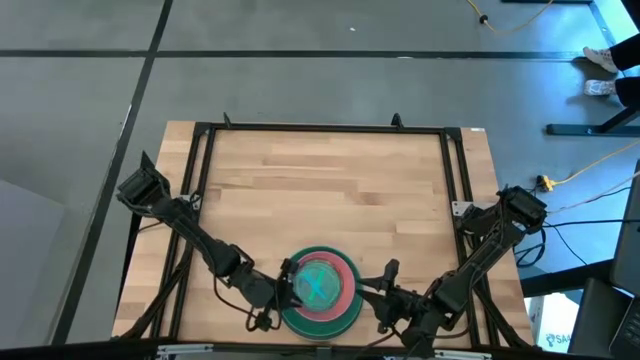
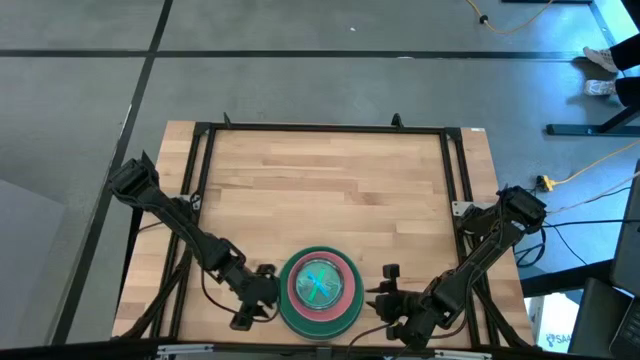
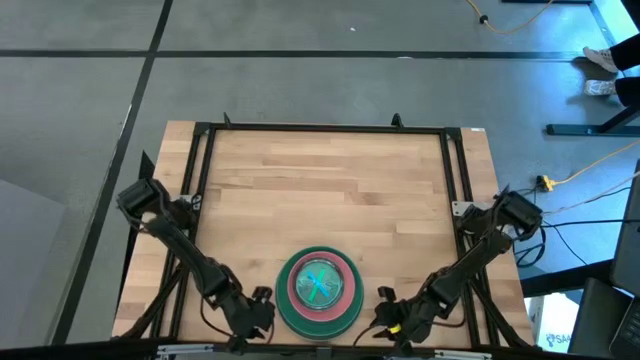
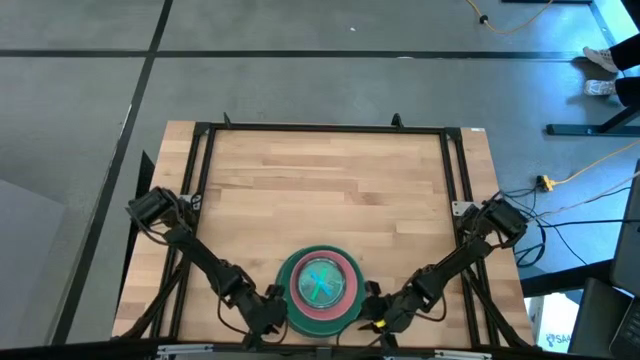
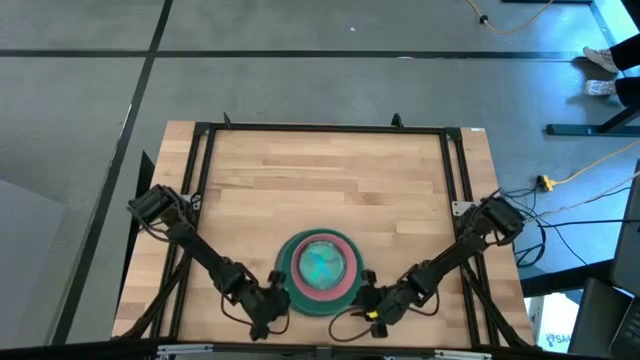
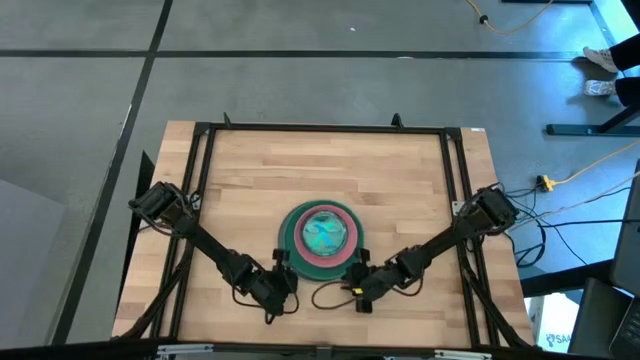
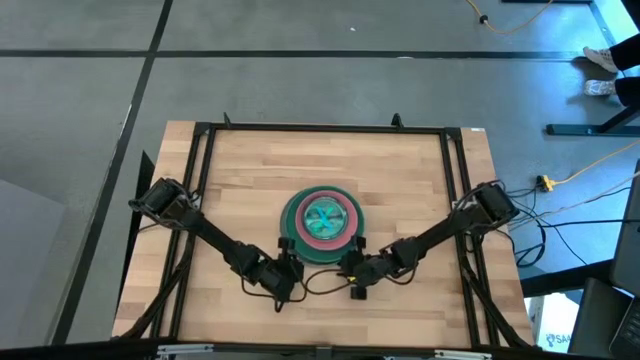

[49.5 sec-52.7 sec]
Task: Stack plastic plates
Move the stack of plates to the center of the table

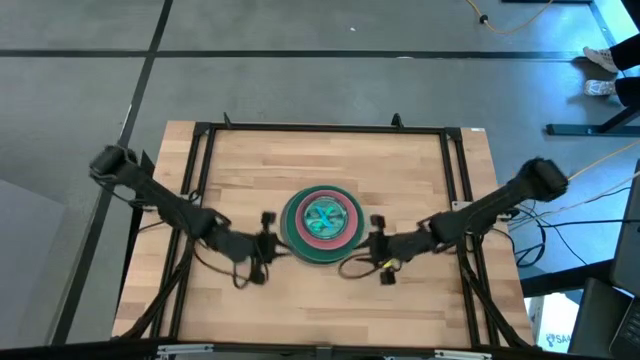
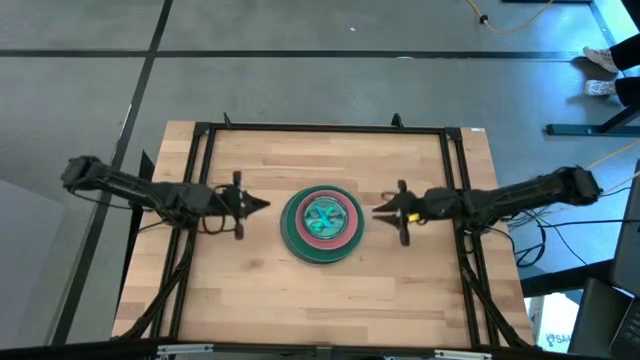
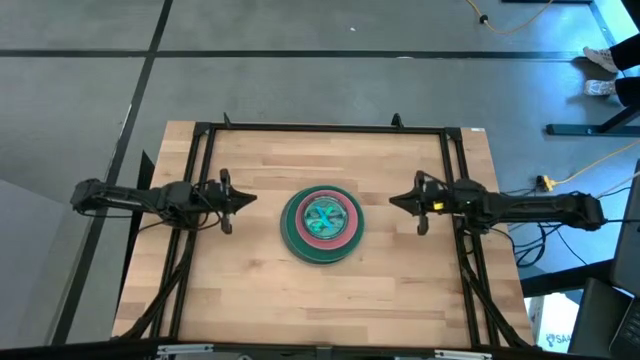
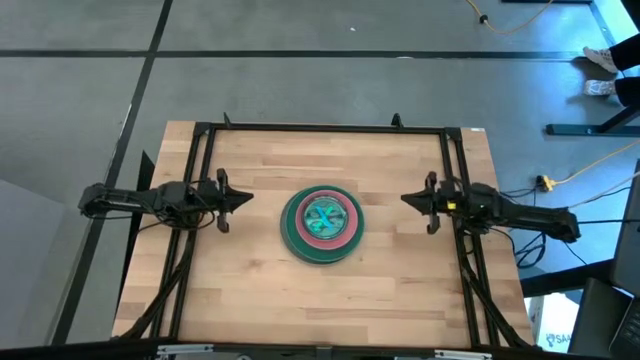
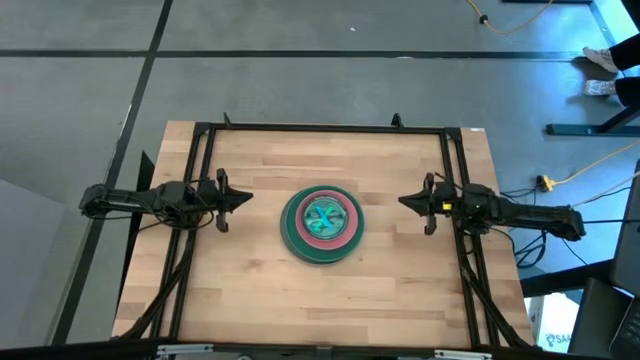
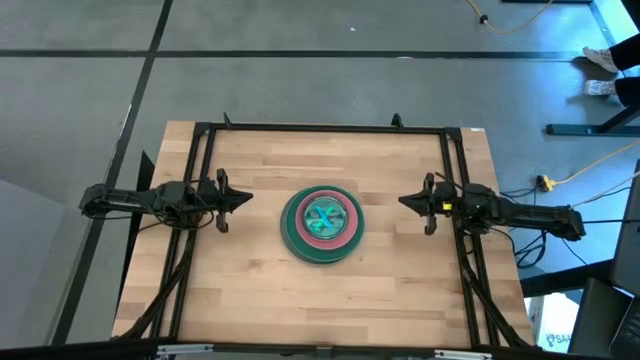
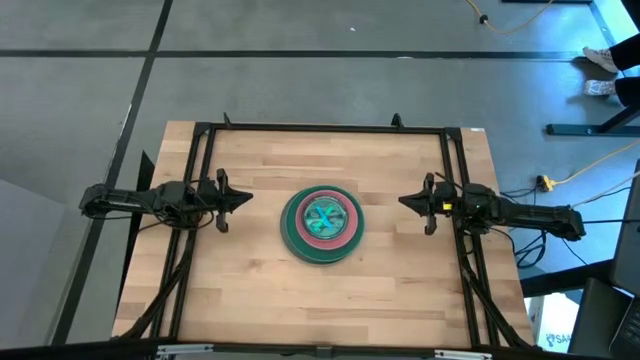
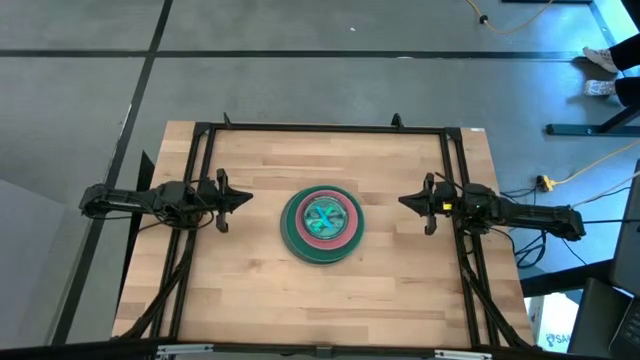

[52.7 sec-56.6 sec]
Return to Home Position

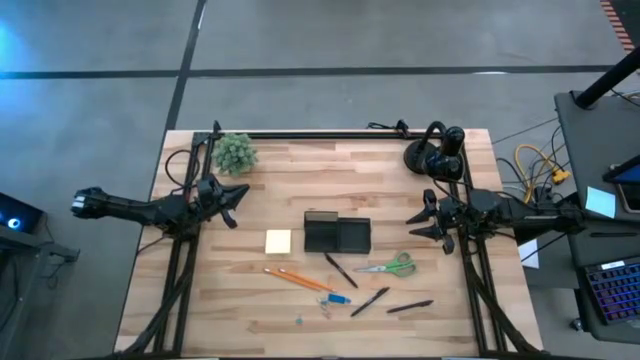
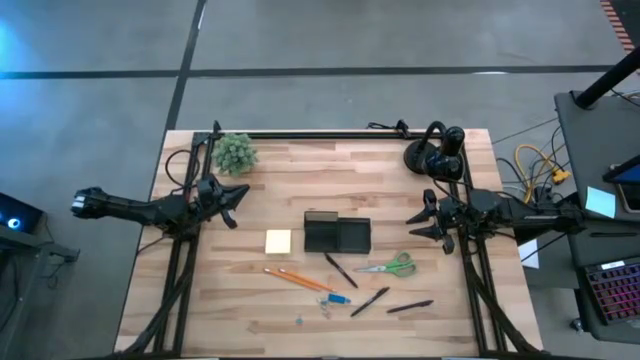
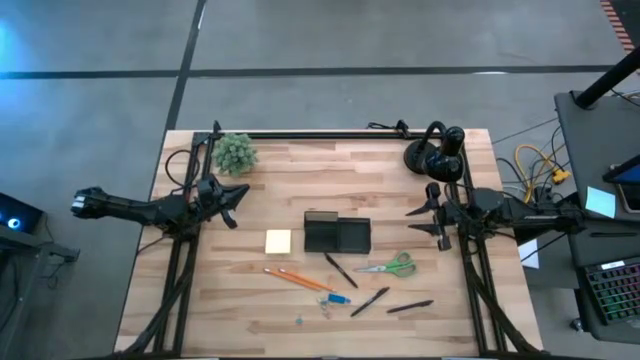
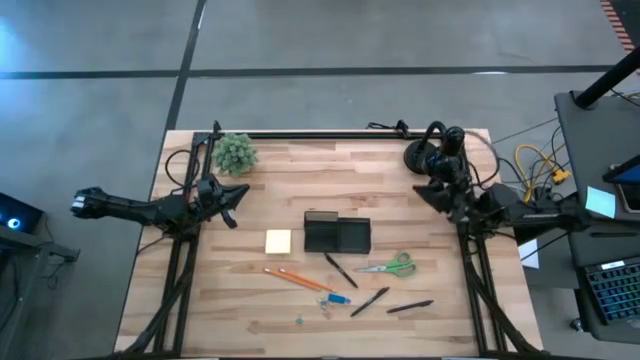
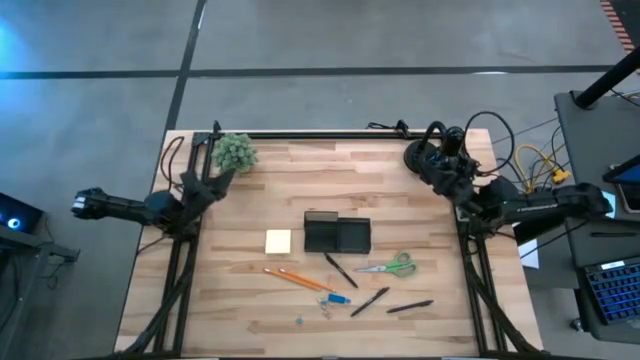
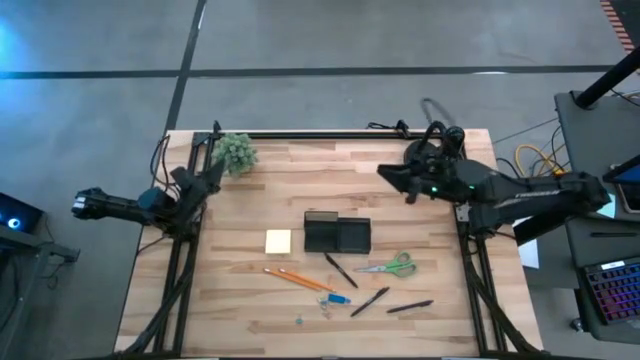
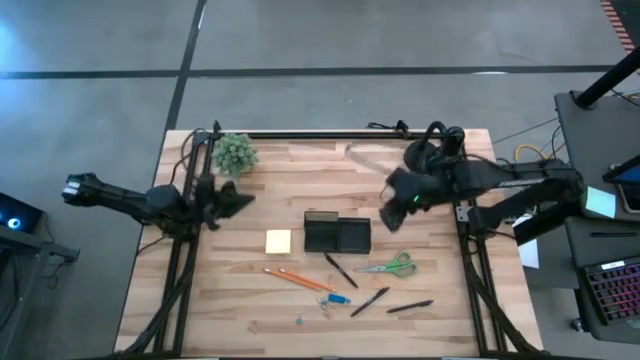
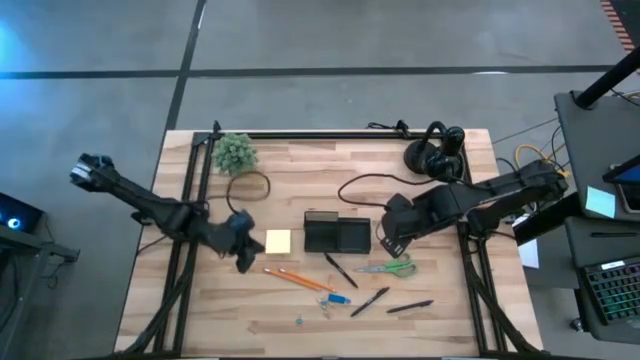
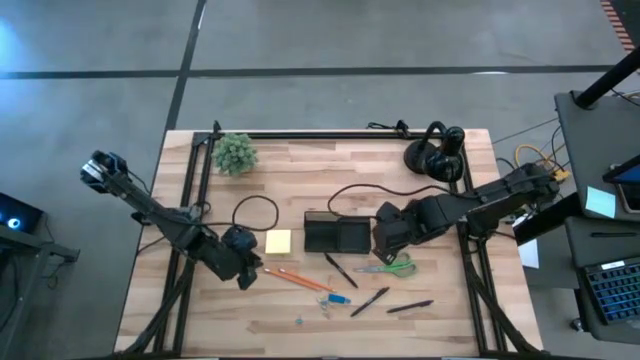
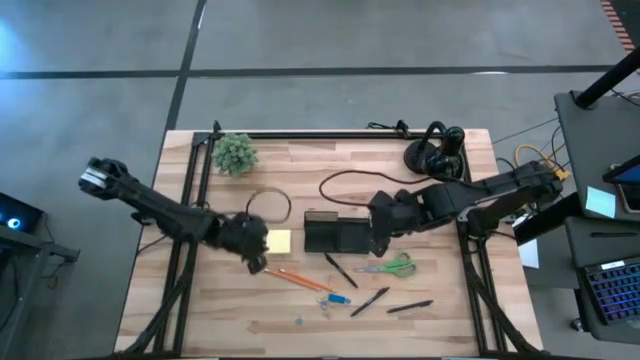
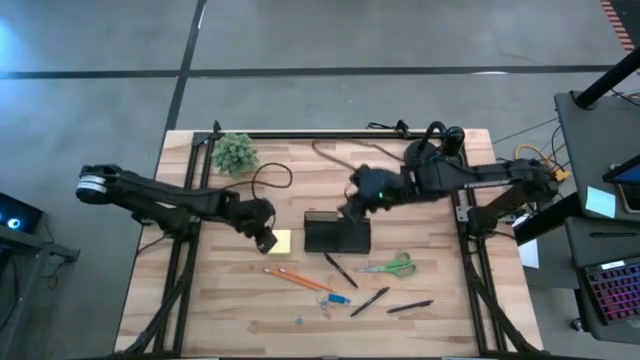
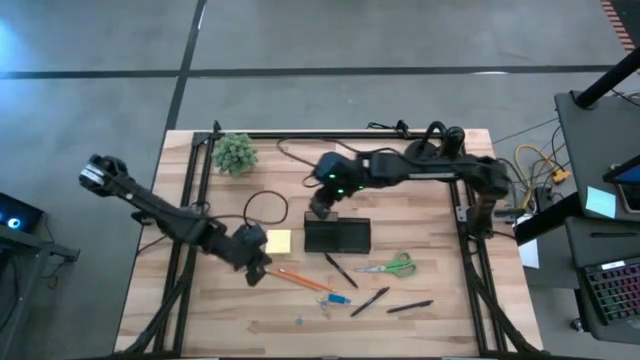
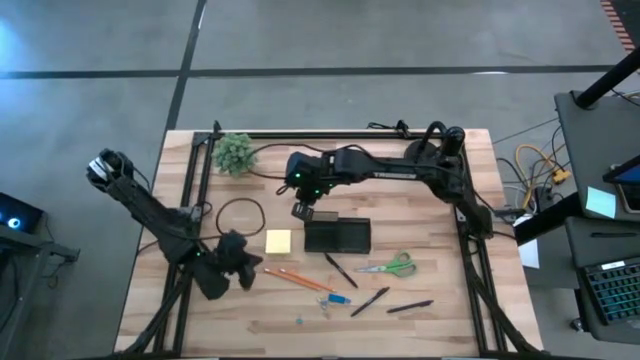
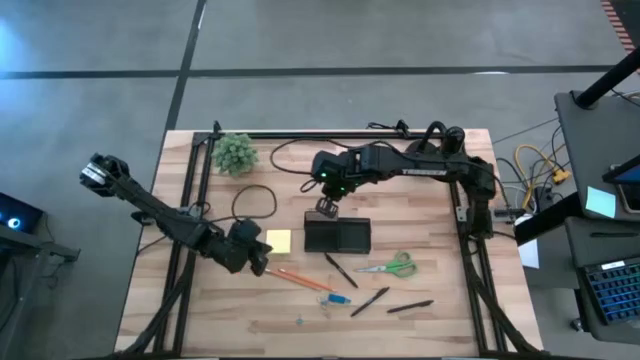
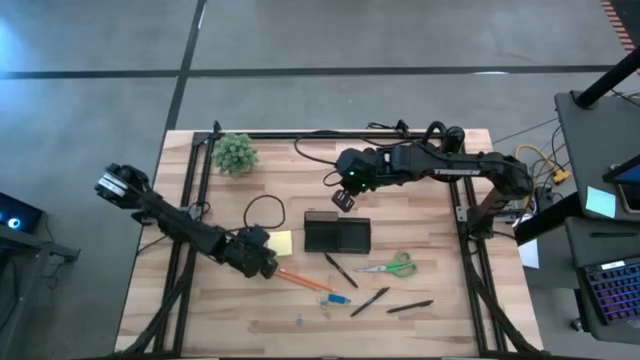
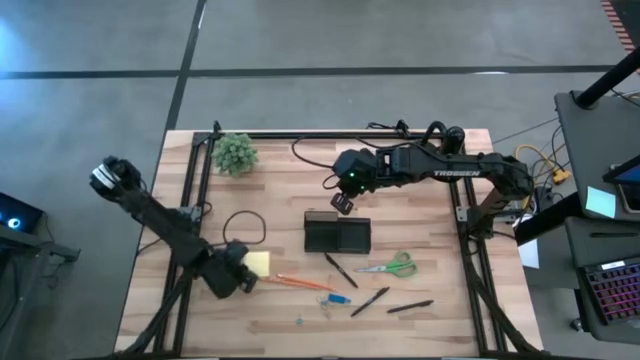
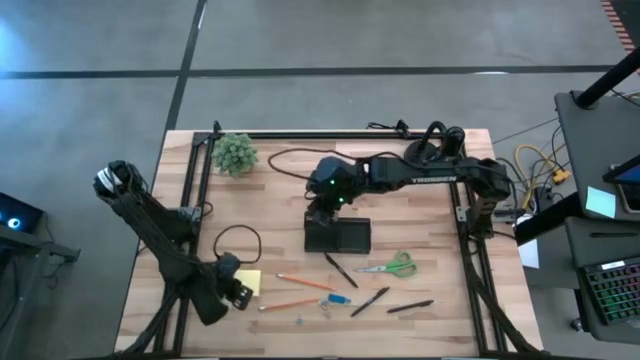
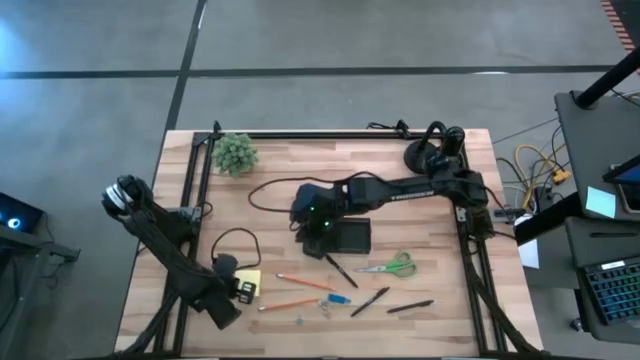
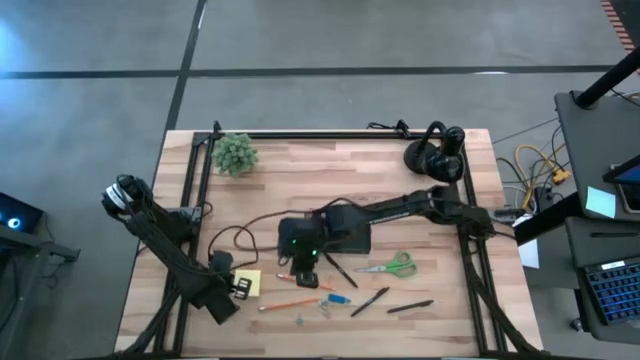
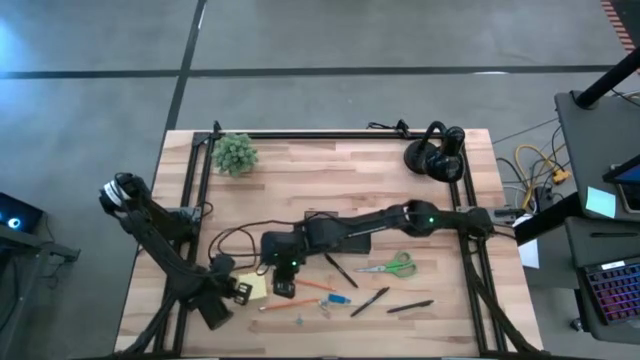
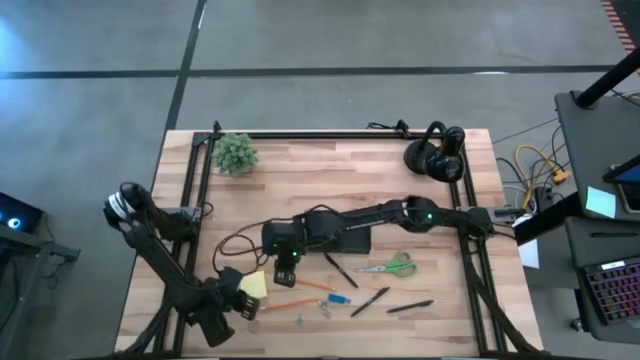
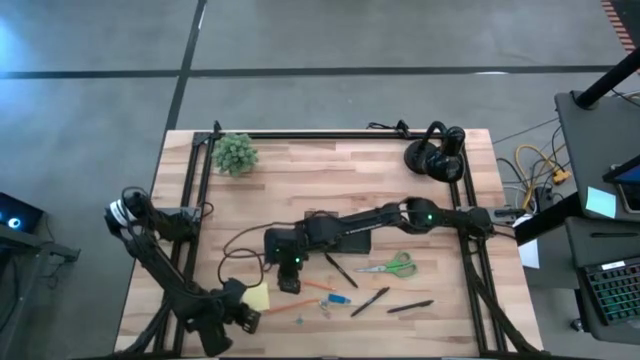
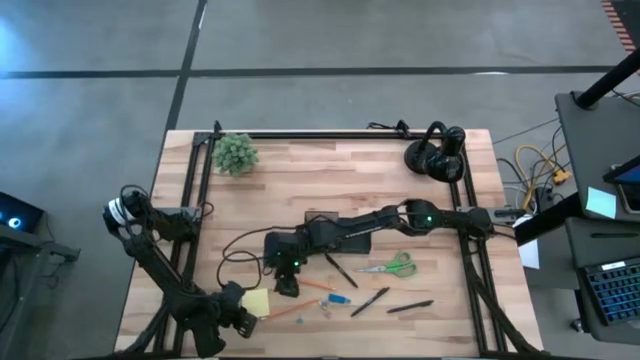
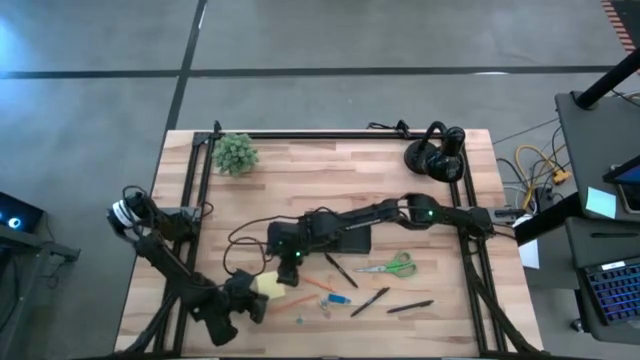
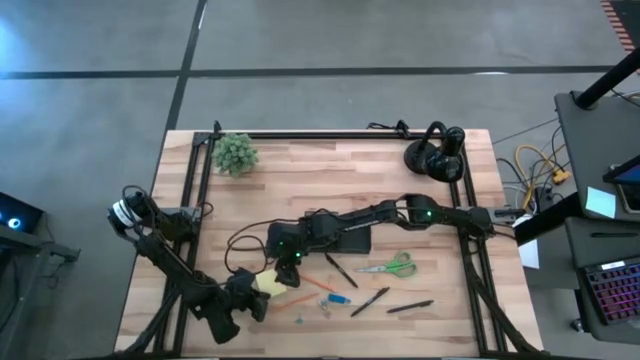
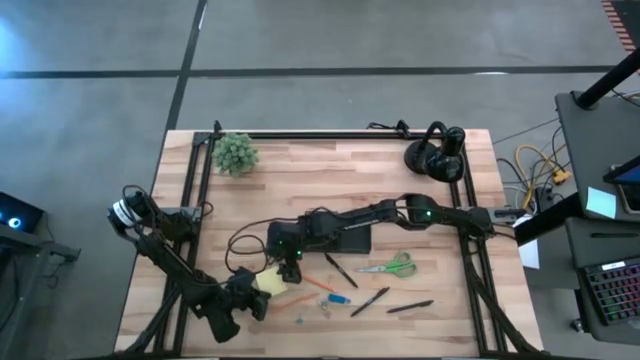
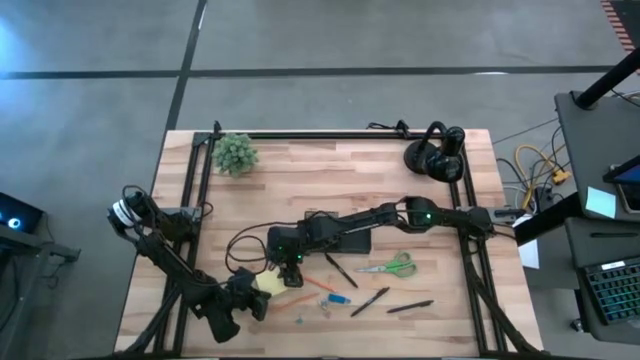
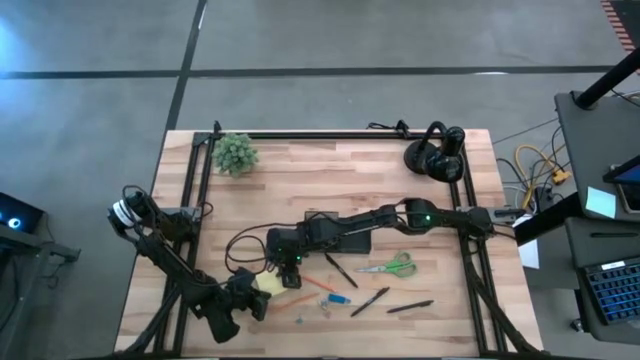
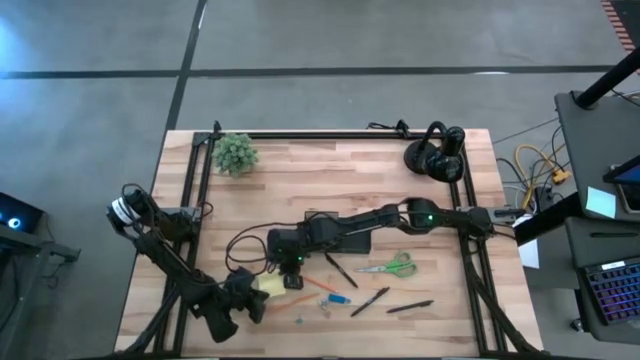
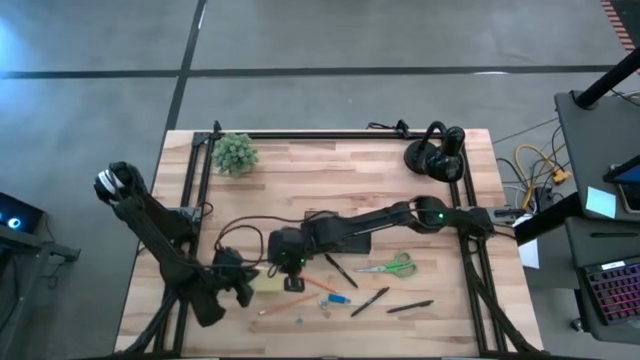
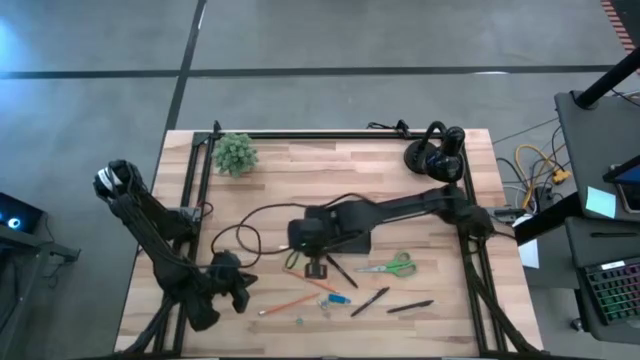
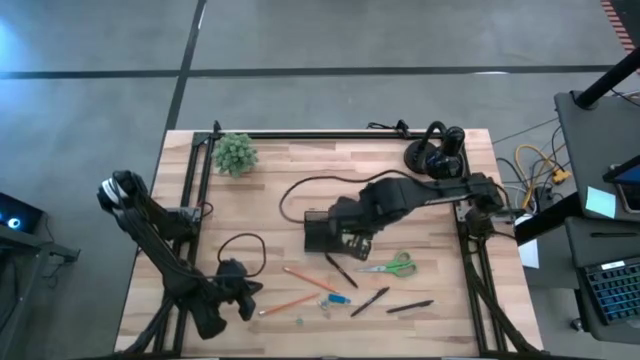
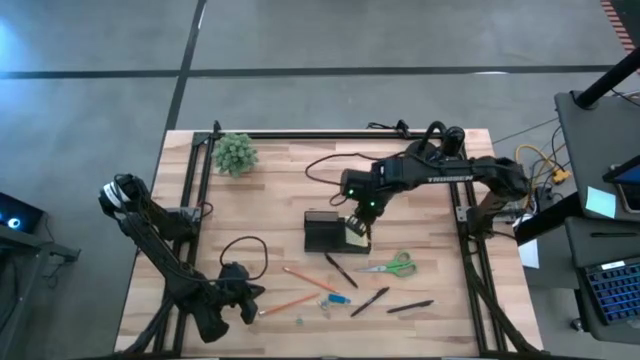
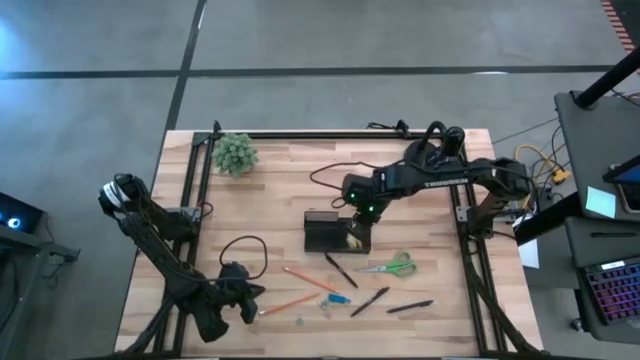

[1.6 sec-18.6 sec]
Task: Pick and place office supplies into organizer
Put the yellow sticky note into the black desk organizer
